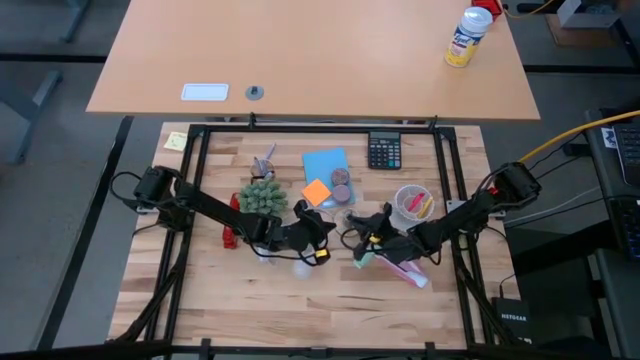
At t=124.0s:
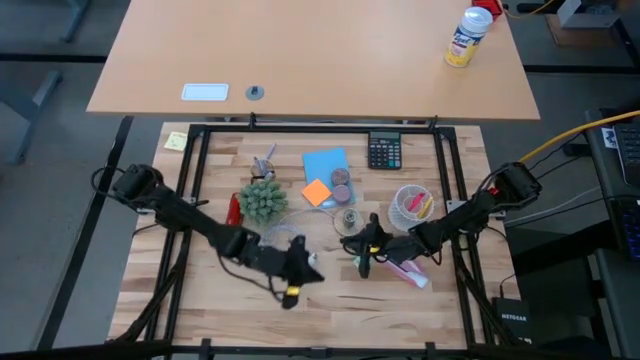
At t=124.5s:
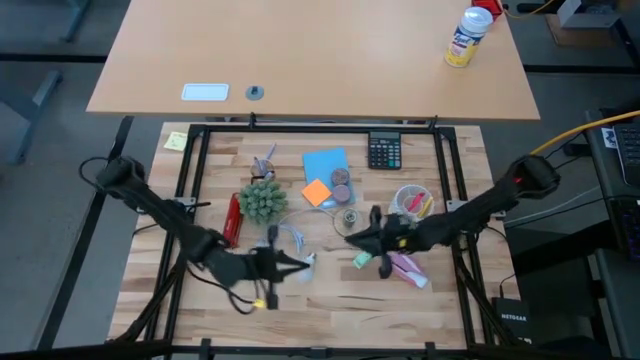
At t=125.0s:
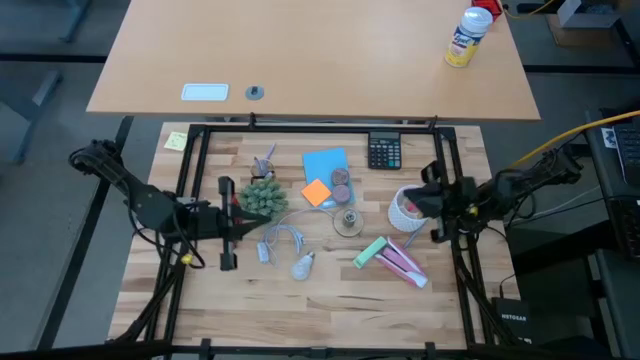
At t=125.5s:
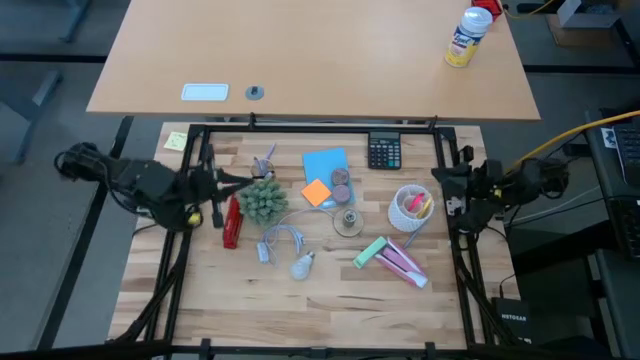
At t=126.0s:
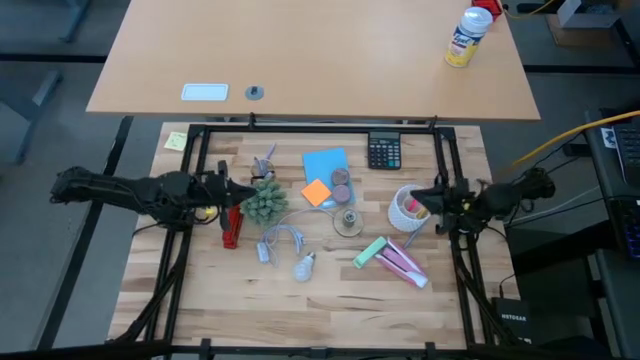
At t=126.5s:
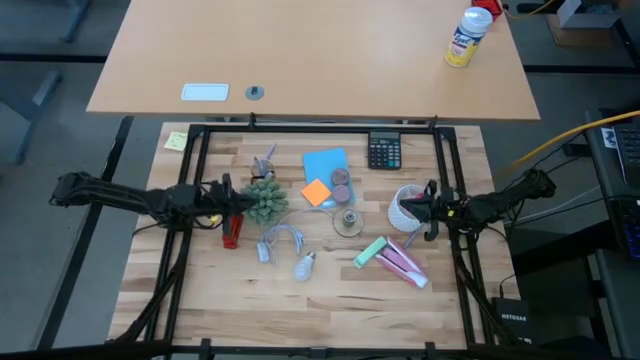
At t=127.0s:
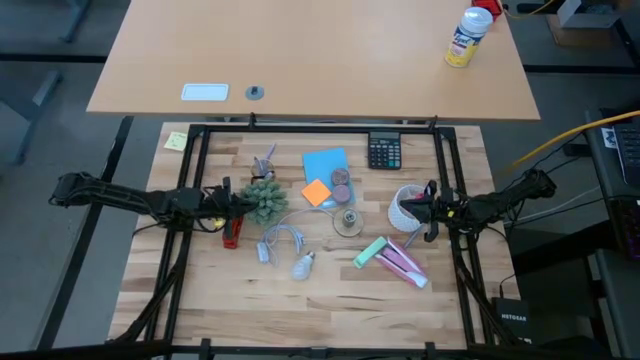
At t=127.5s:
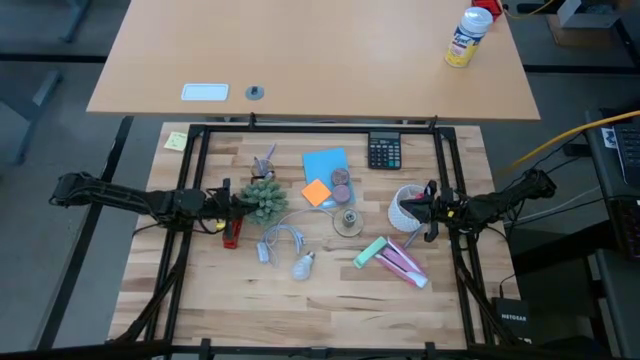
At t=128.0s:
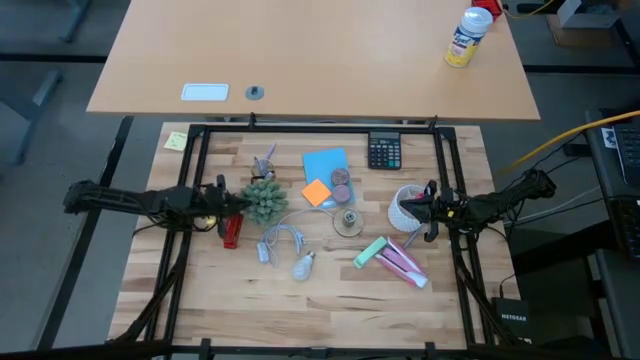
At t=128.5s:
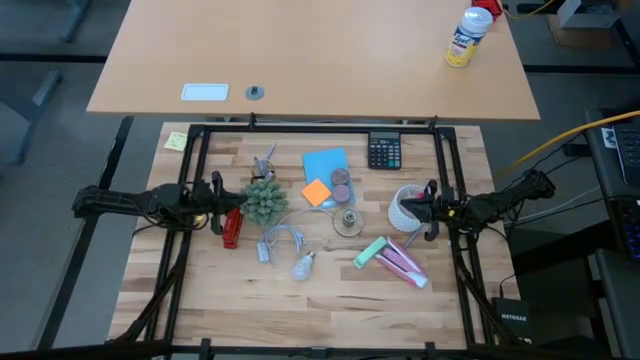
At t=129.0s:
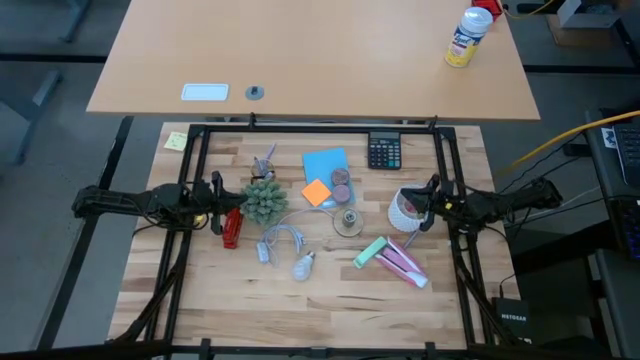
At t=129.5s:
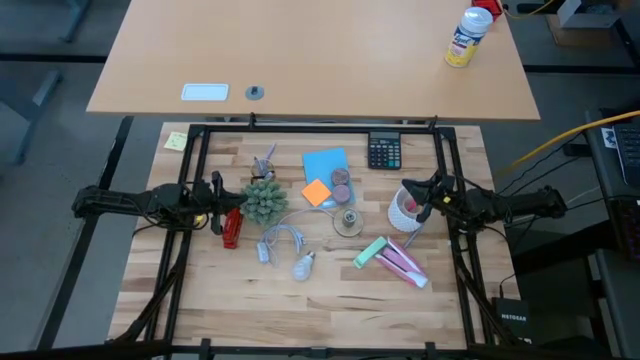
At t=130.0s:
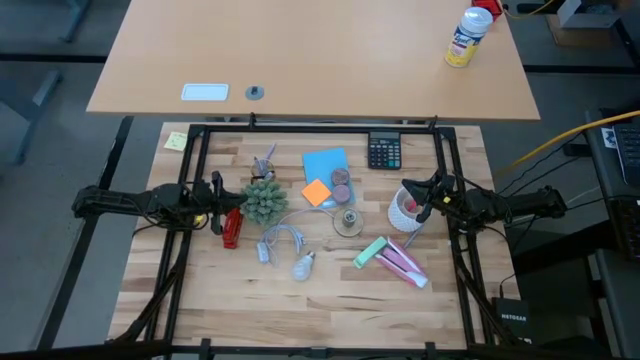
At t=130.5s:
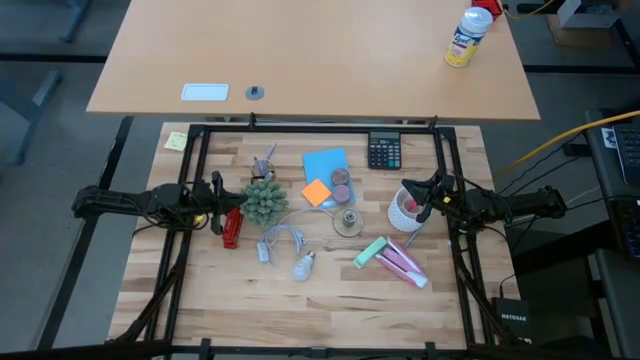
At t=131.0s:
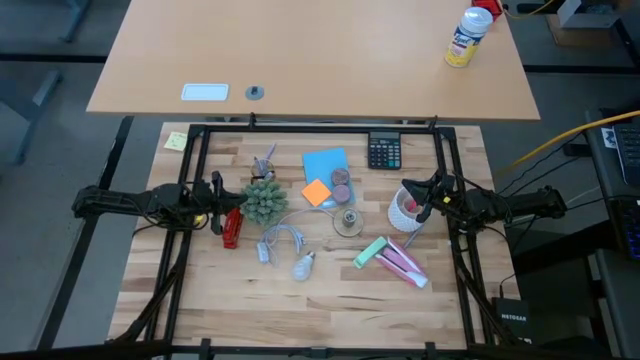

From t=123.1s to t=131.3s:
Task: Screw lightbulb
Return to Home Position

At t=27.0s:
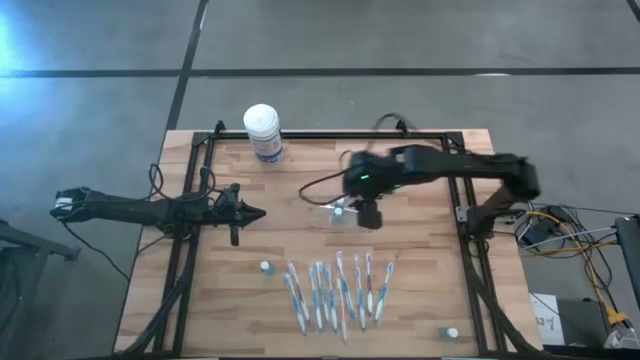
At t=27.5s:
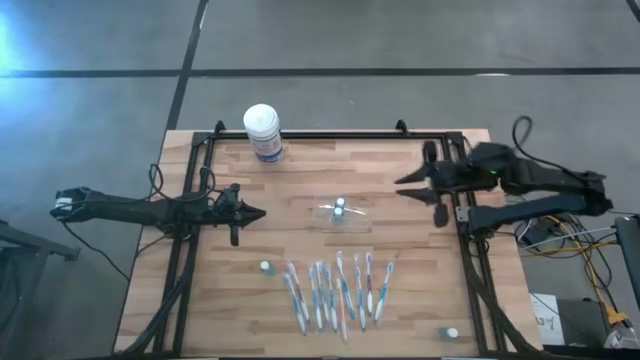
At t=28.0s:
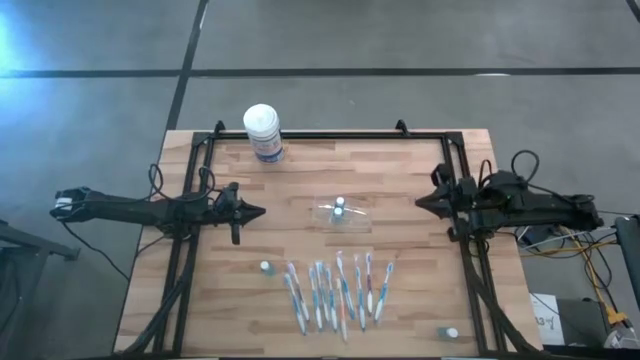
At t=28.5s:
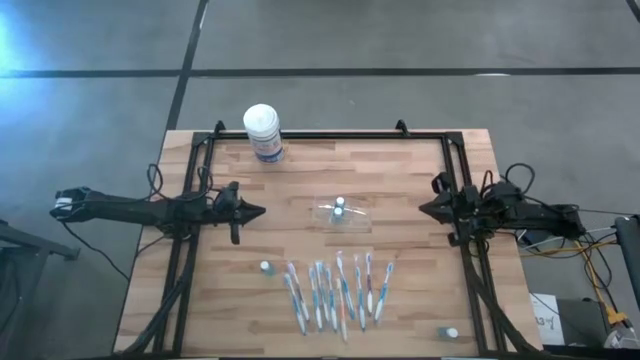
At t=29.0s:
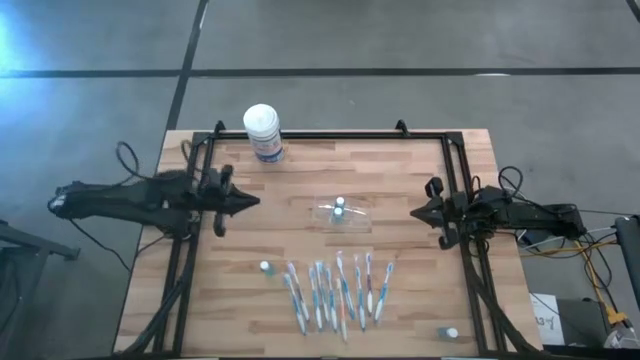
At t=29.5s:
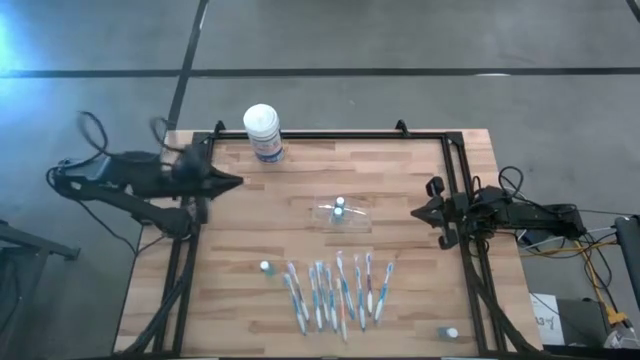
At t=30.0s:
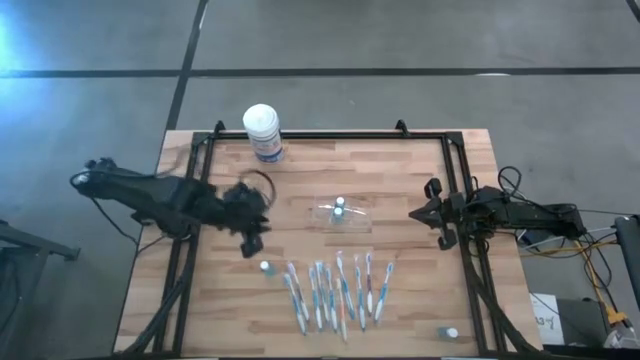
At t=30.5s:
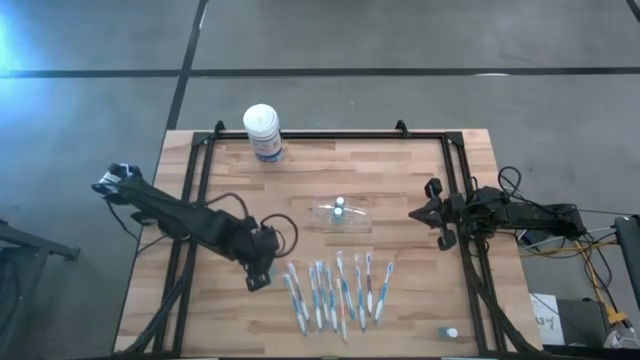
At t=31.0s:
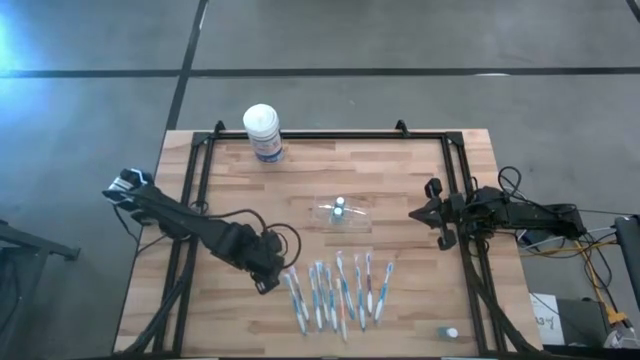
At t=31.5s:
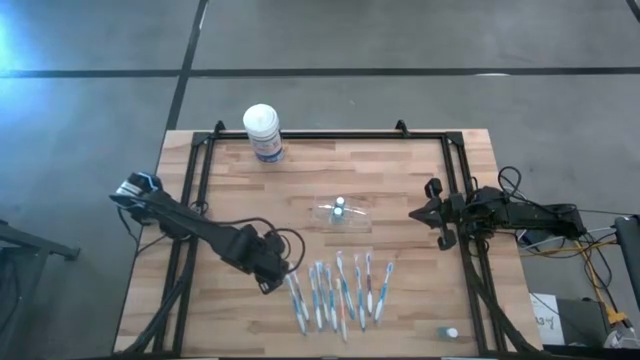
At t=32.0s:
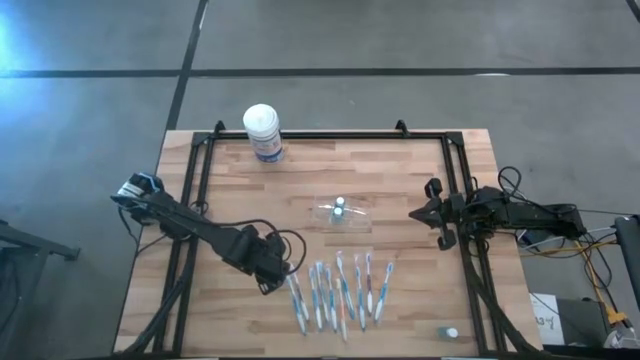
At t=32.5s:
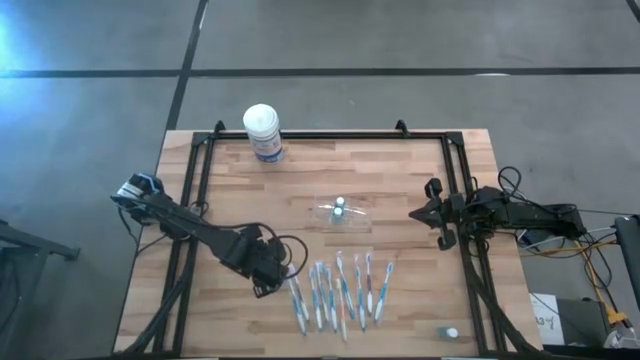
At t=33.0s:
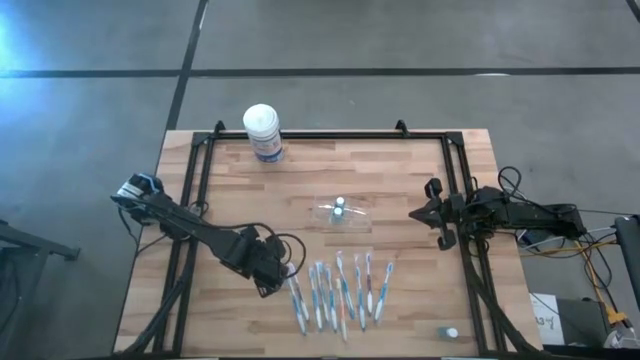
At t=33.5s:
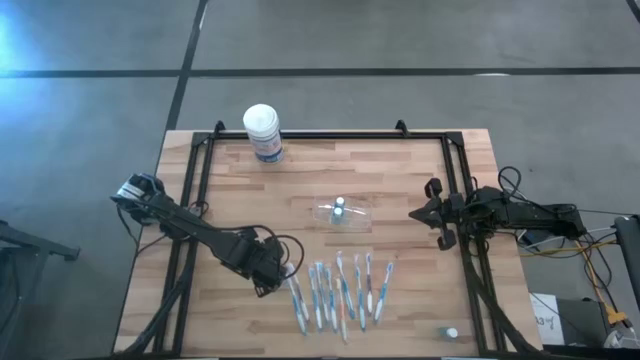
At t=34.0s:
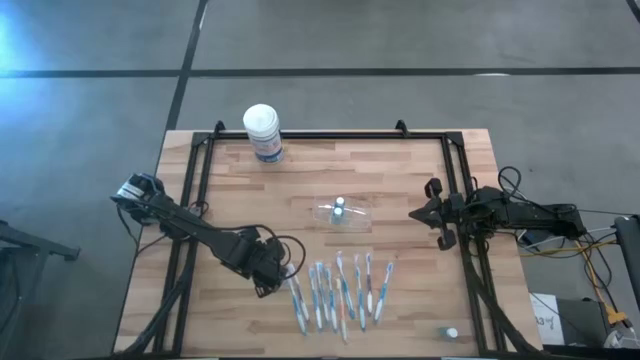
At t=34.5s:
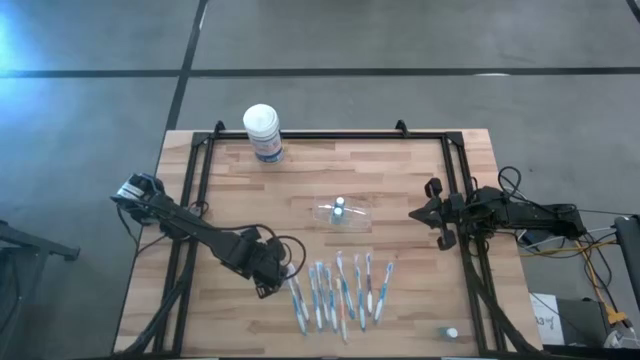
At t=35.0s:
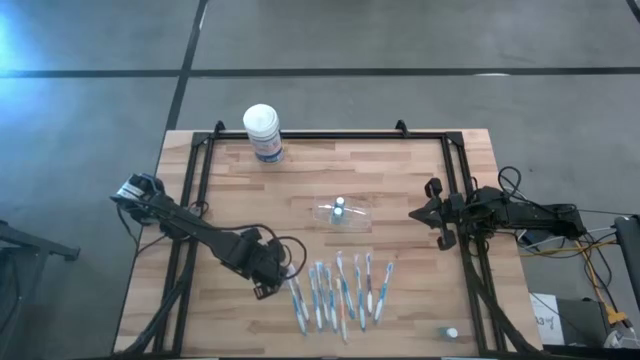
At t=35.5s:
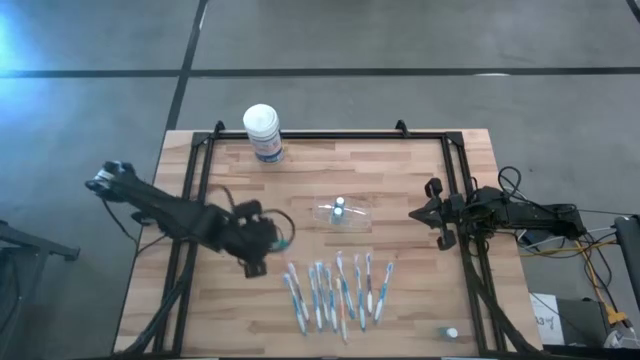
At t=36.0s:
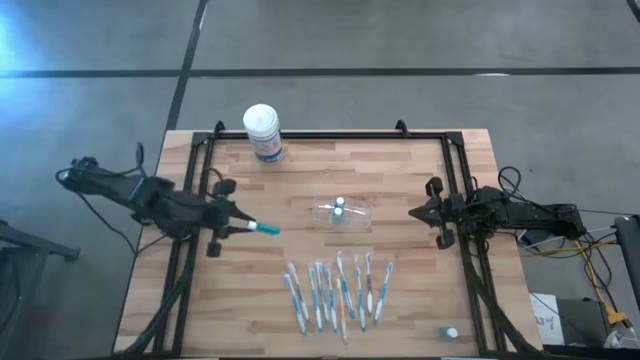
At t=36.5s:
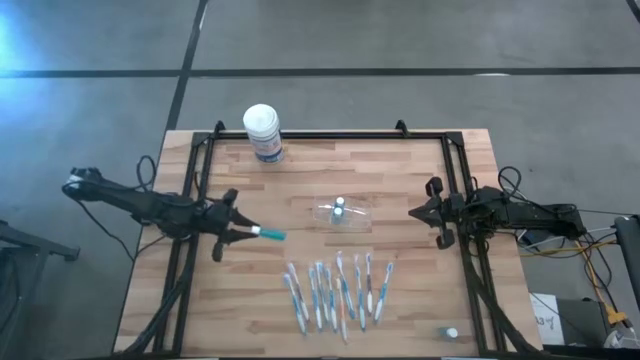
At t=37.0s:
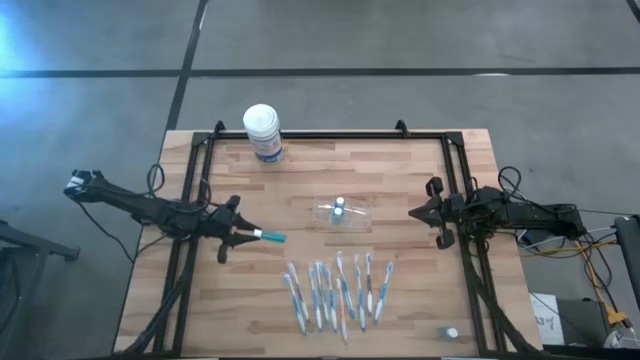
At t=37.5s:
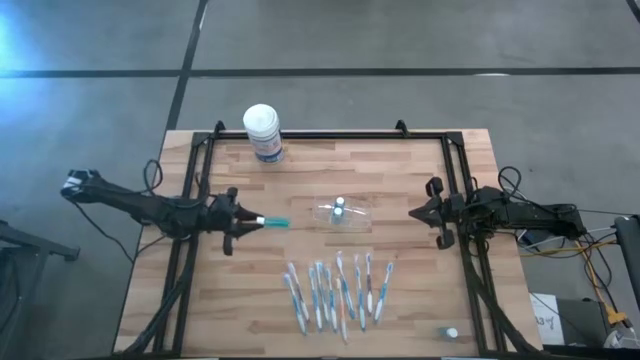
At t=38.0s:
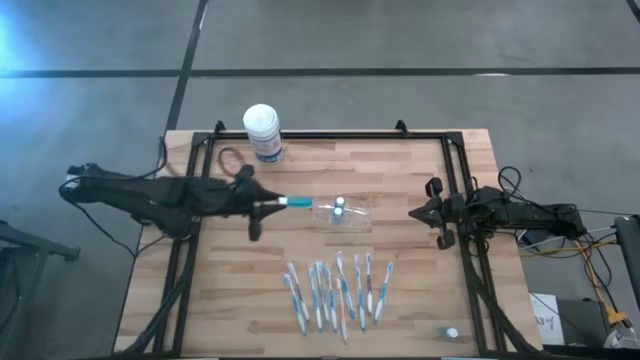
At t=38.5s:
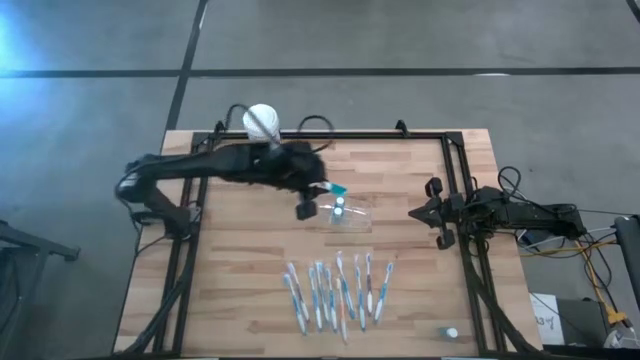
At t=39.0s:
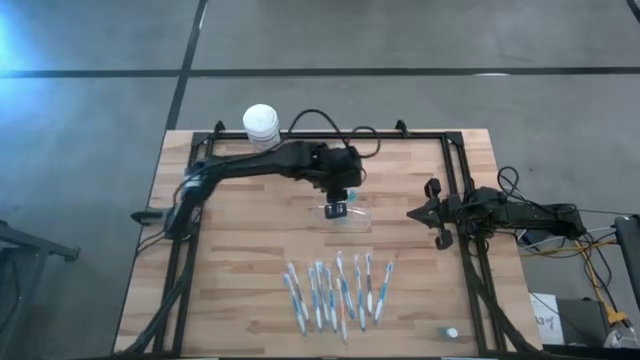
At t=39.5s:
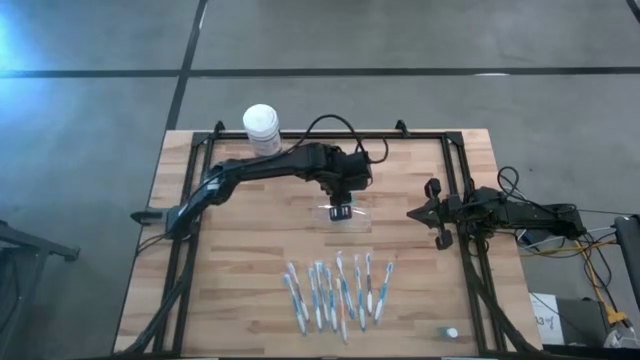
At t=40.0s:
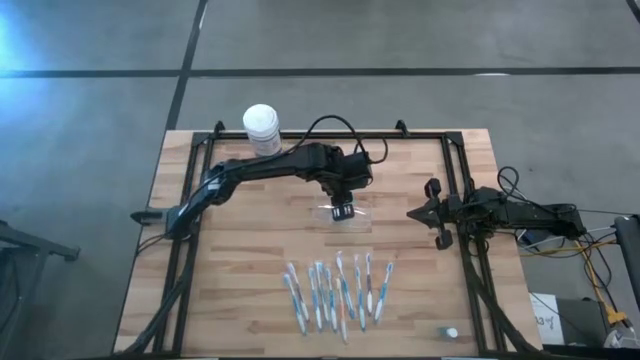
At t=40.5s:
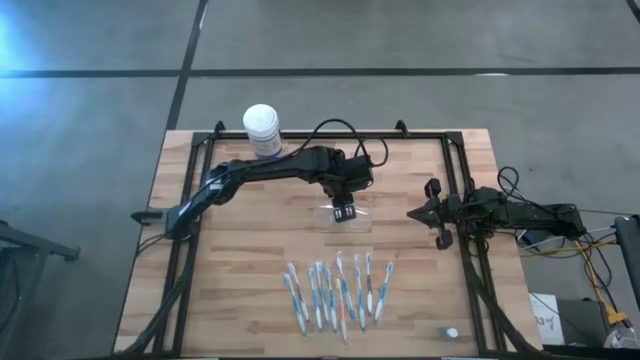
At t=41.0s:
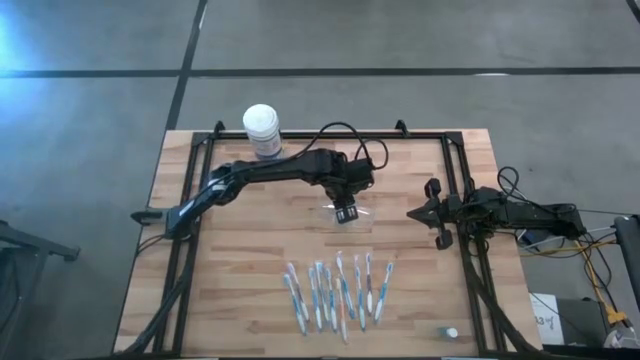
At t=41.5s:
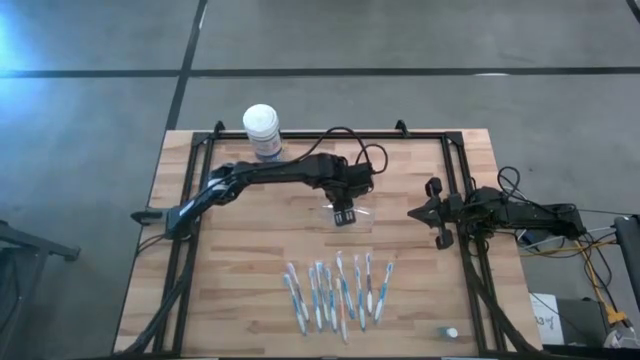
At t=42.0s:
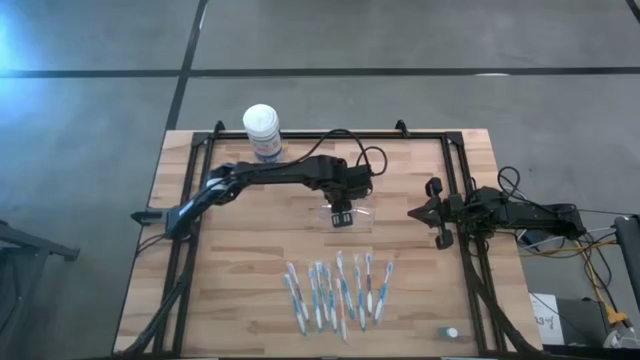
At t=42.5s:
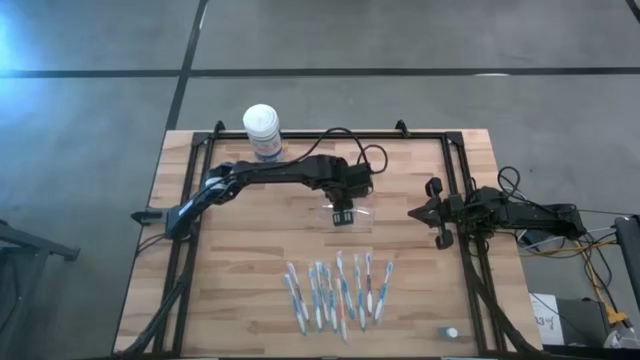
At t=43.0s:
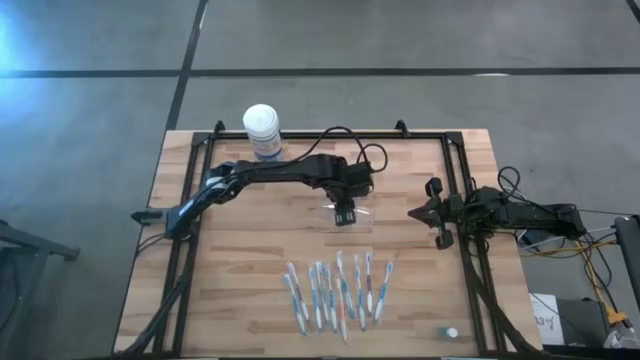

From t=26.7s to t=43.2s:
Task: Pick & Place toothbrushing station
Put the blue mouthwash into the transparent organizer
